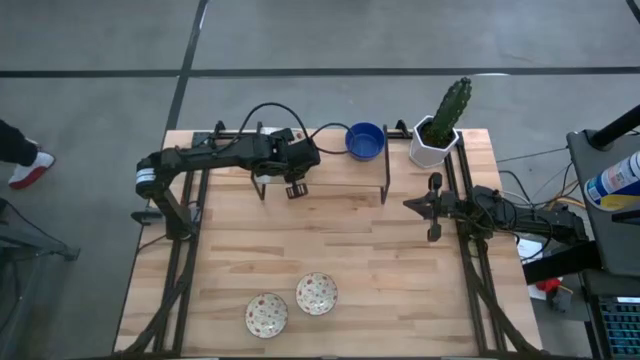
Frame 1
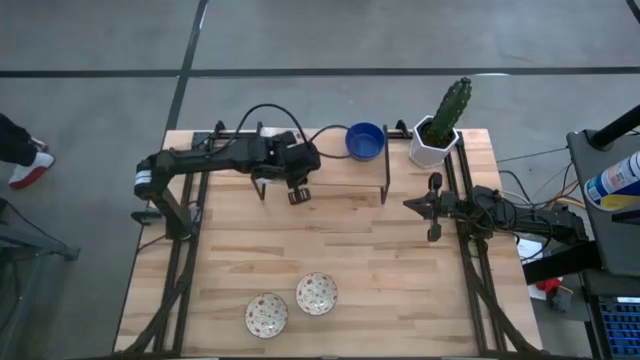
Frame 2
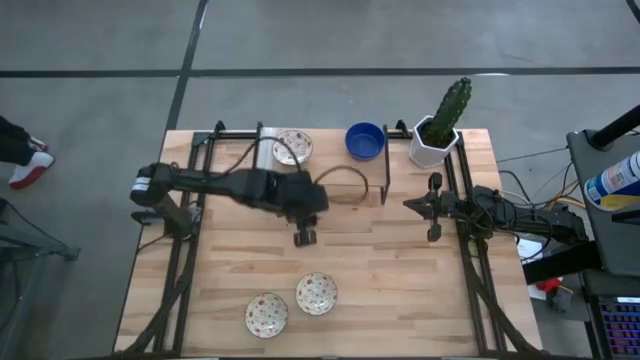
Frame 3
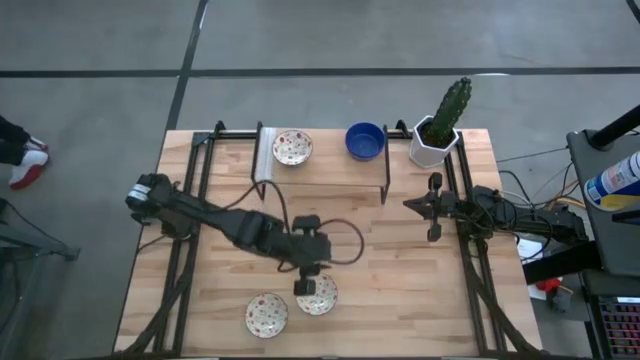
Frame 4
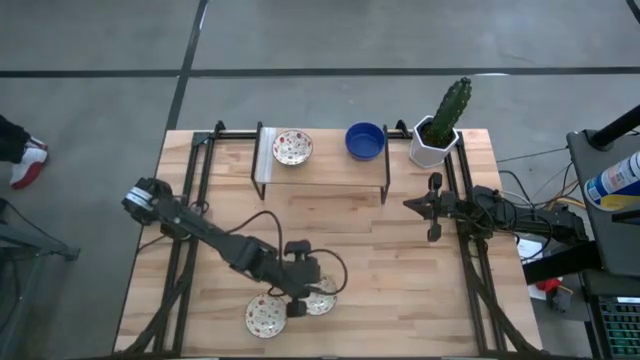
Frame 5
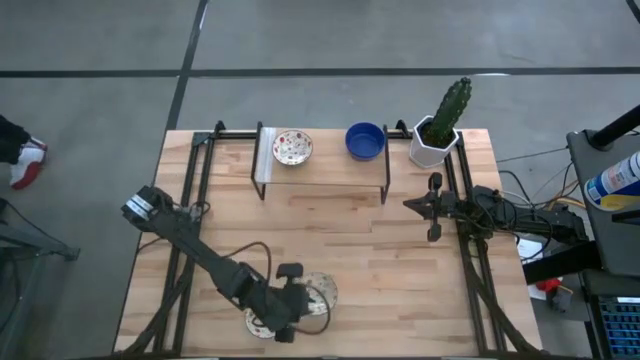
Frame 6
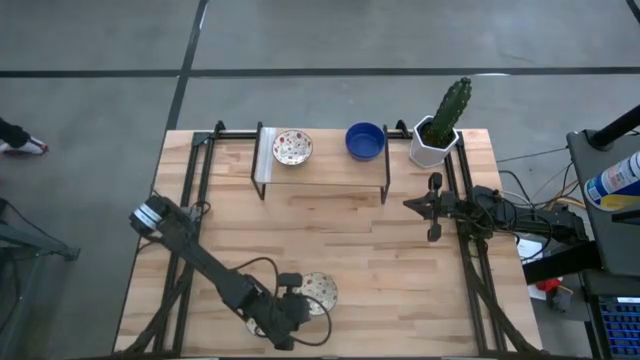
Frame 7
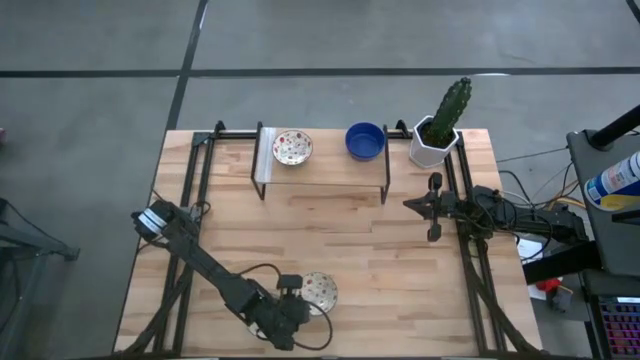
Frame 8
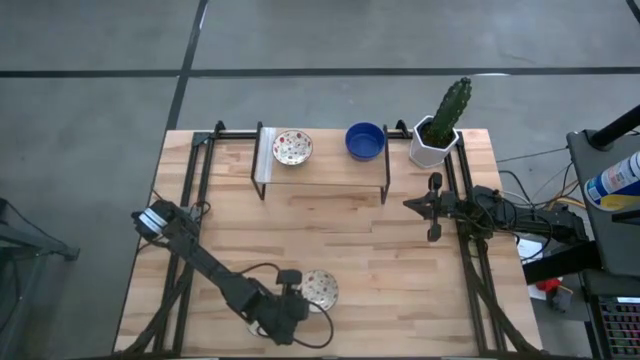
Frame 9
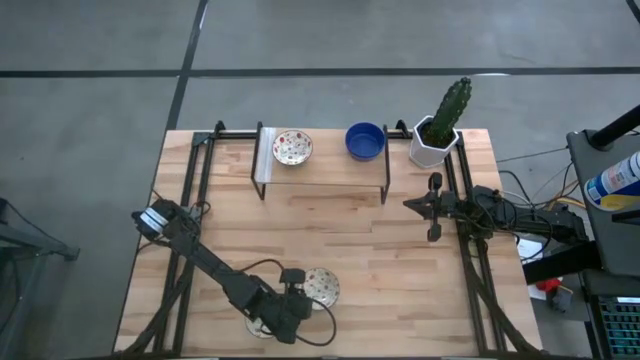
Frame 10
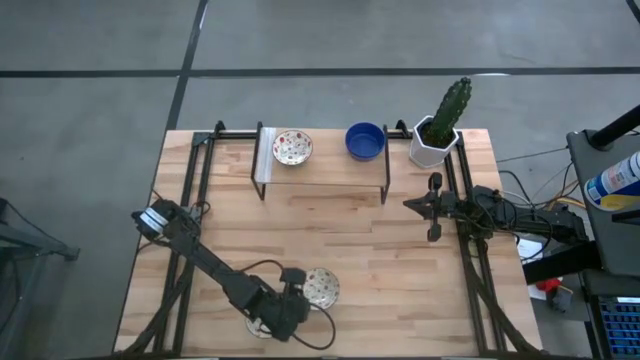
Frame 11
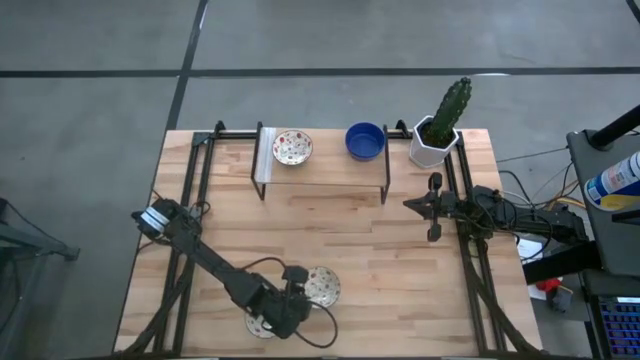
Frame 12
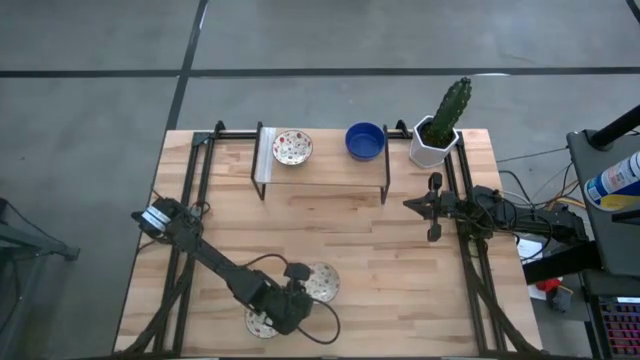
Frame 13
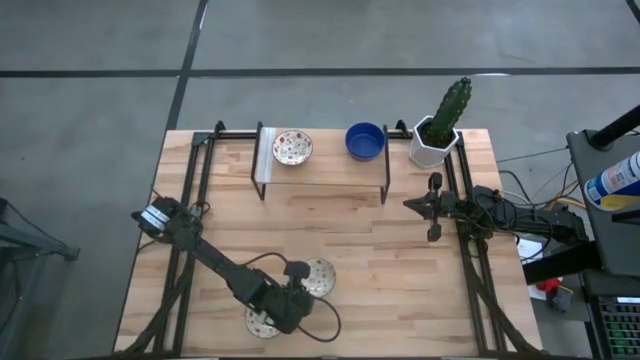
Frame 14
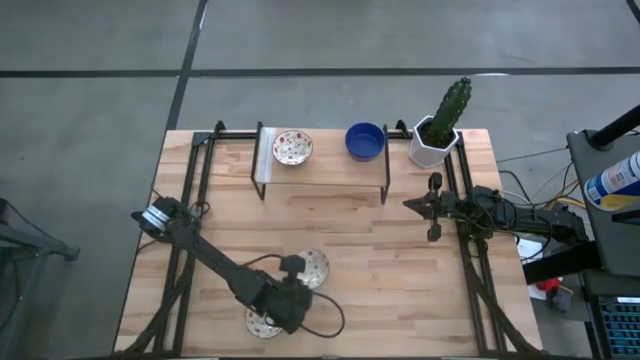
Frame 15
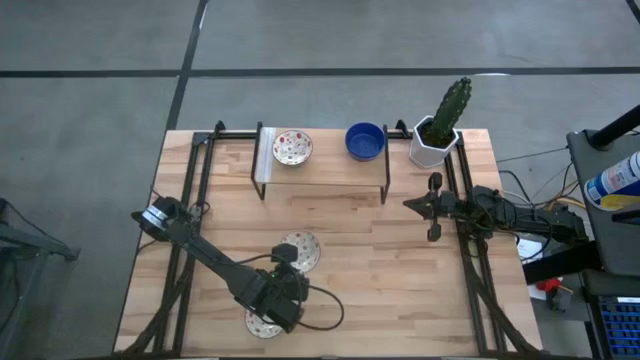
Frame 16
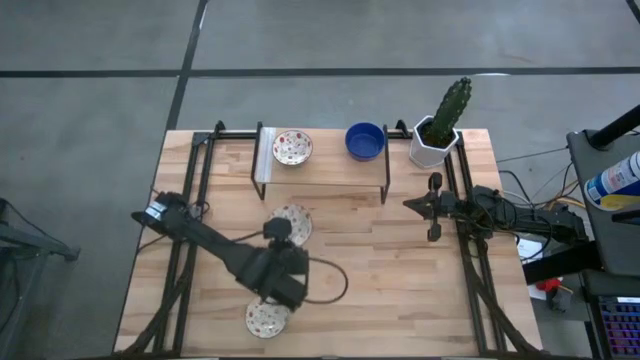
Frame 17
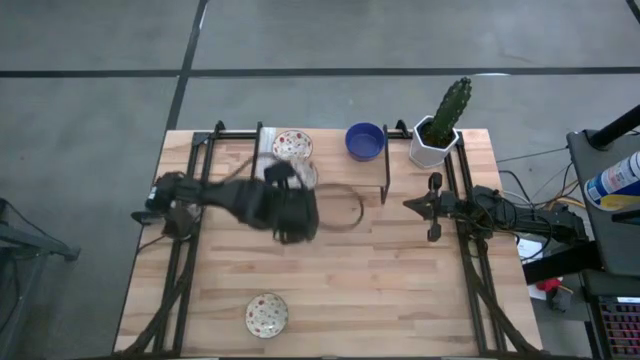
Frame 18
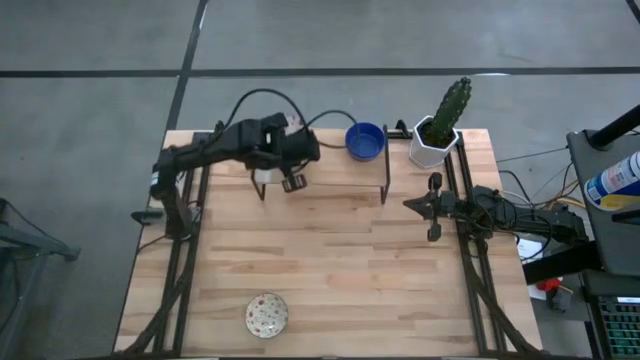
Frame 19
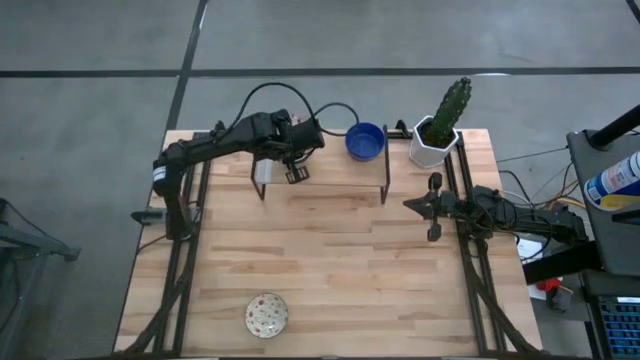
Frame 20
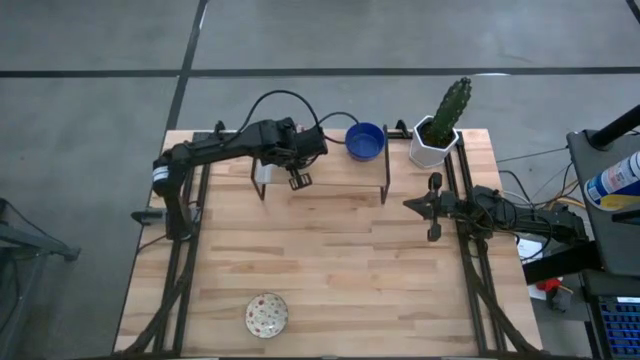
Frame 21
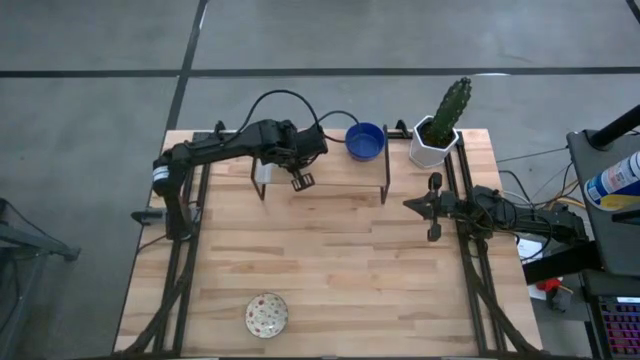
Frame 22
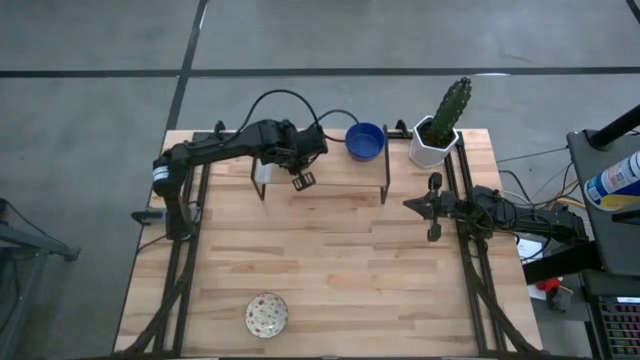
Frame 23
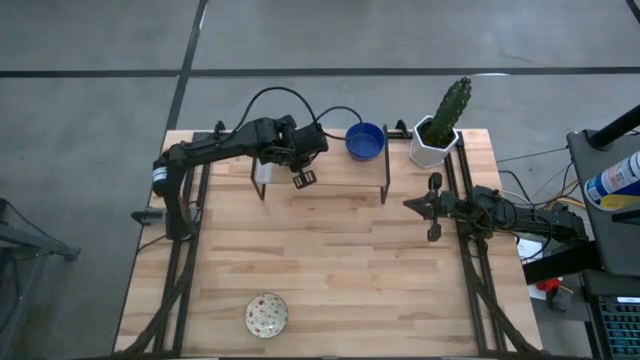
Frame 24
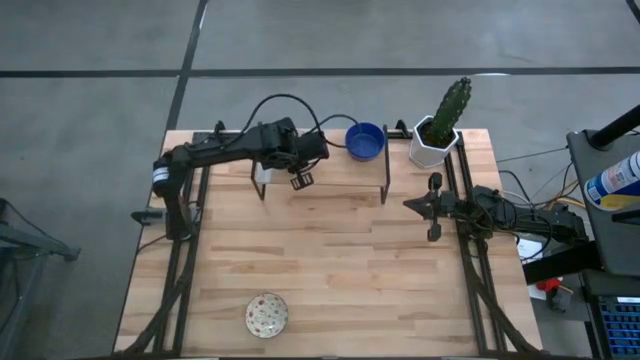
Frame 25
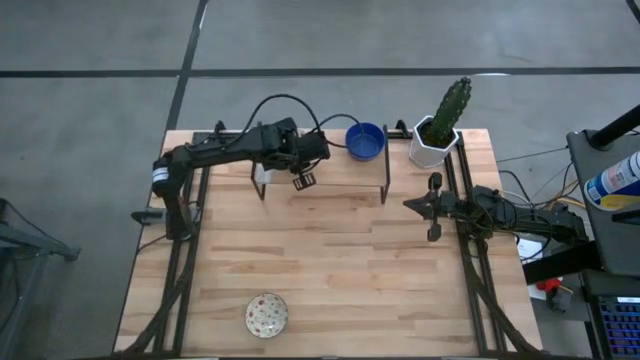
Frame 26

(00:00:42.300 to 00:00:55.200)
Task: Pick & Place Mini bowls
Stack the top white bowl on top of the white bowl on the shelf

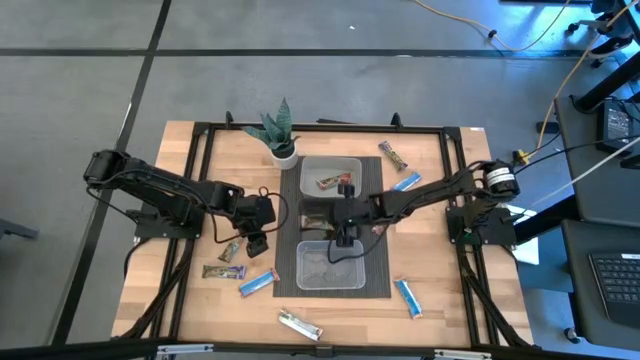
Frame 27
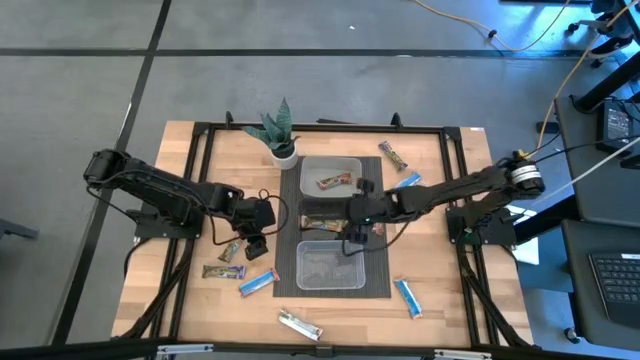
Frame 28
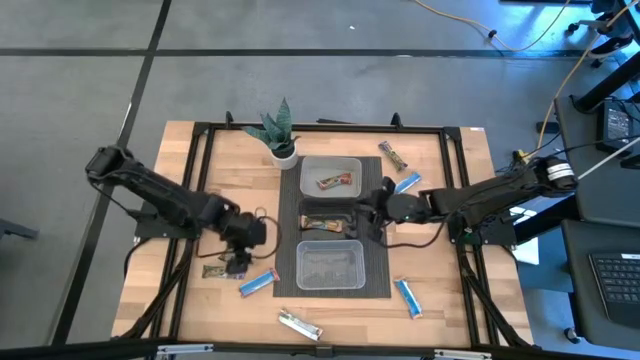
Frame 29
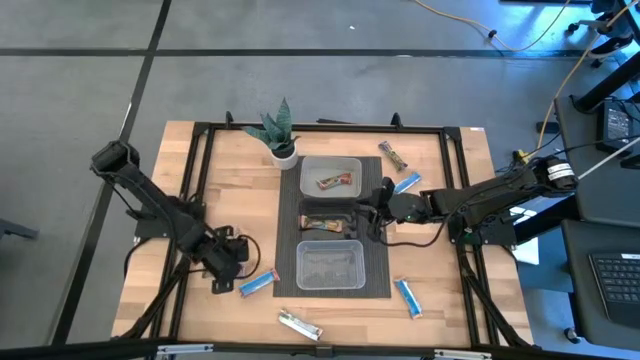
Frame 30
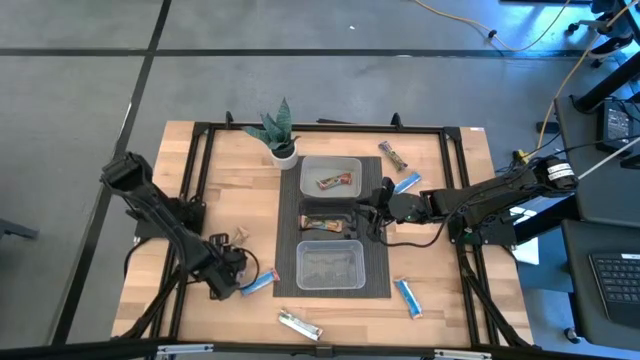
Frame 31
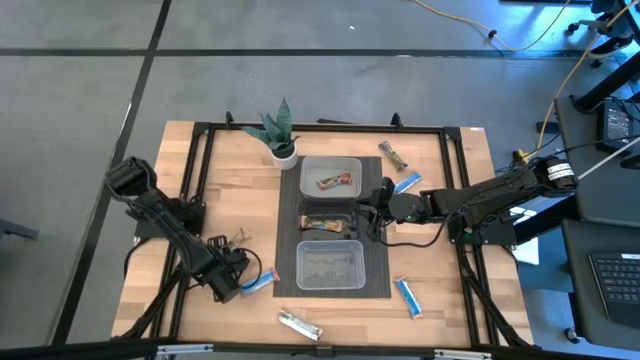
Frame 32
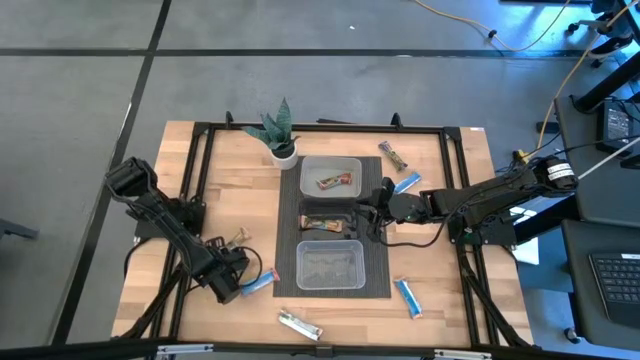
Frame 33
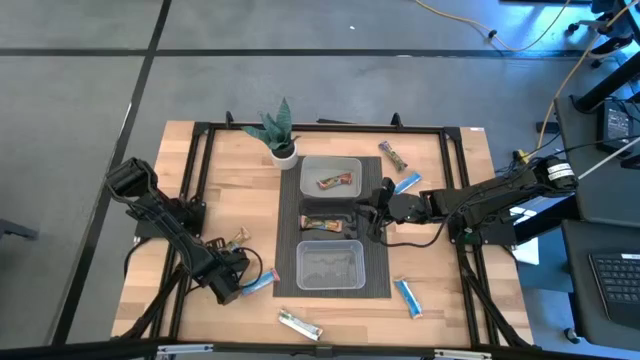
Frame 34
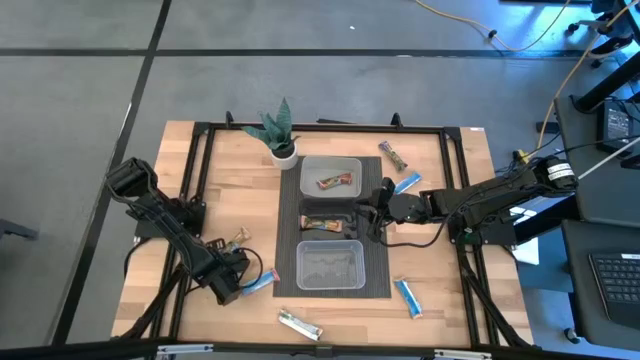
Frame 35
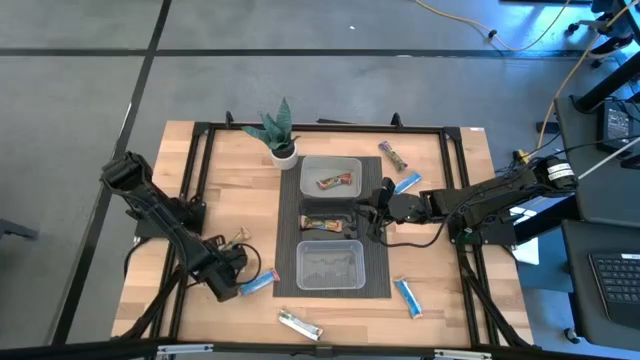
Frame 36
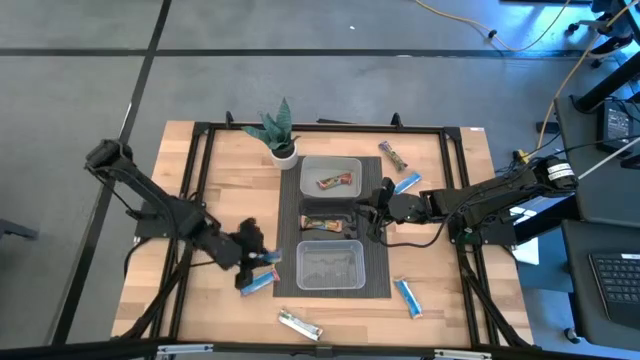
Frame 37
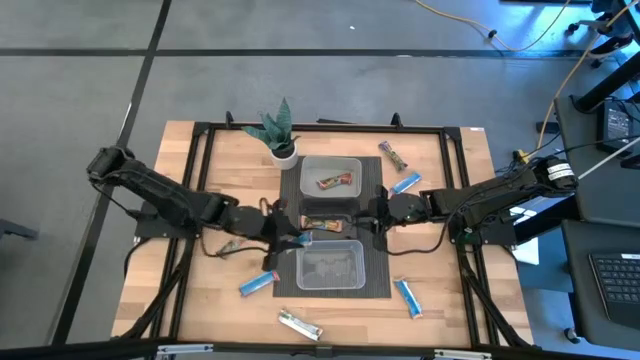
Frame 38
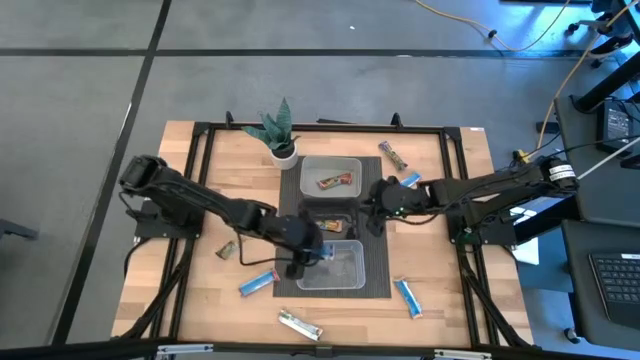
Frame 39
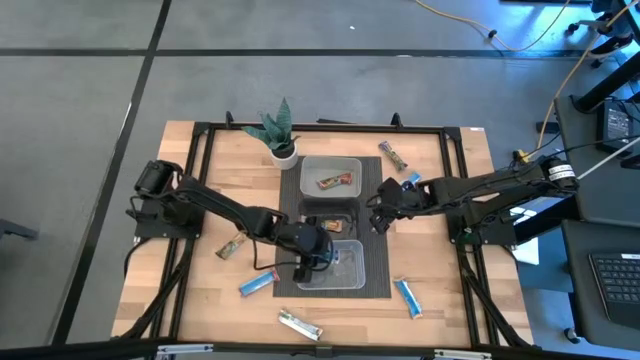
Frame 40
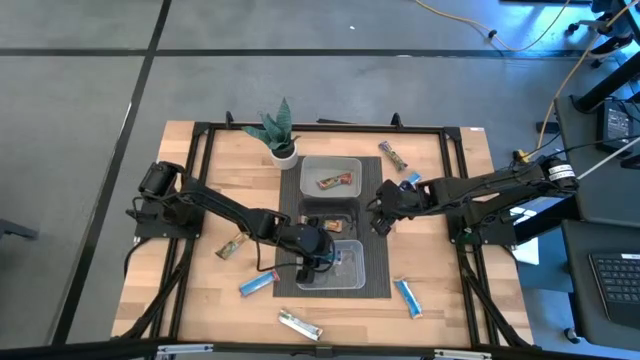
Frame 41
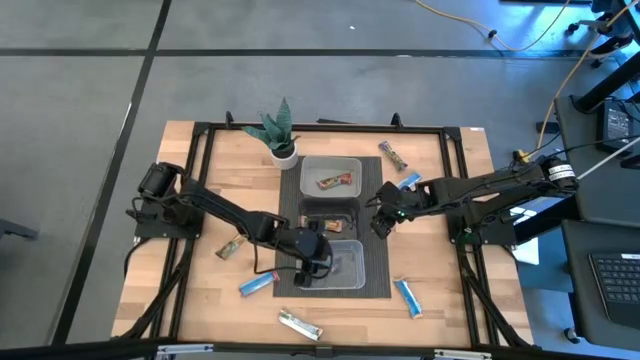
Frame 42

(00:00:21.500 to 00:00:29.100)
Task: Pick and place Granola Bars by type
Put the blue granola bar into the transparent bin
